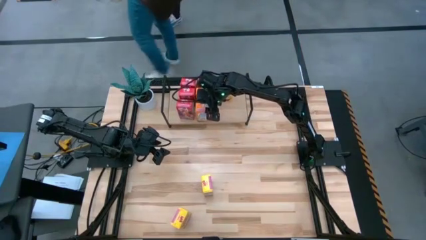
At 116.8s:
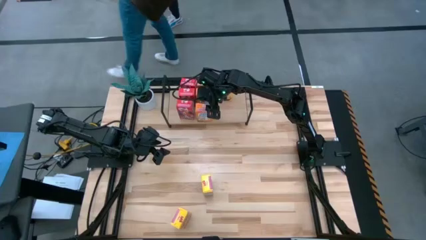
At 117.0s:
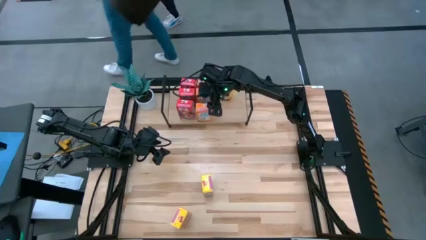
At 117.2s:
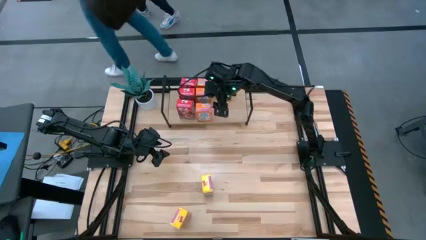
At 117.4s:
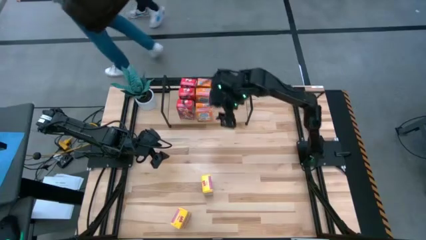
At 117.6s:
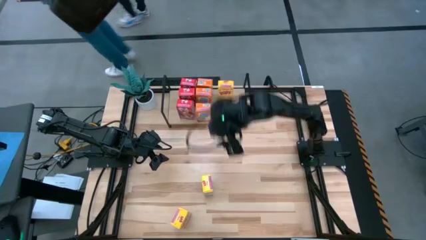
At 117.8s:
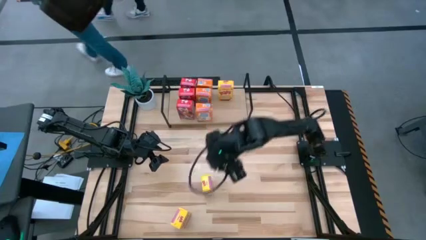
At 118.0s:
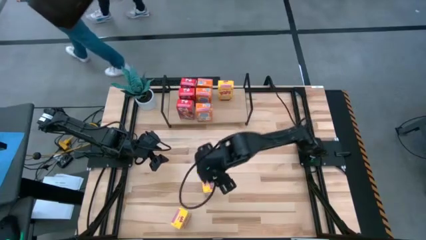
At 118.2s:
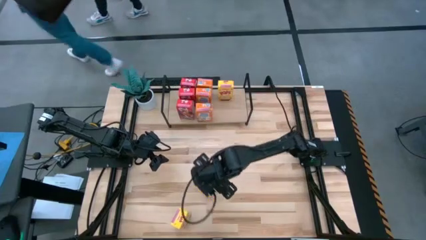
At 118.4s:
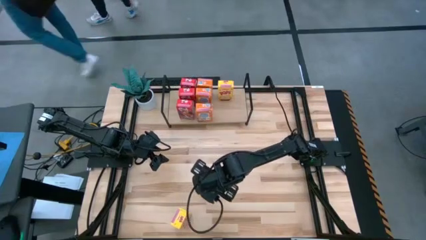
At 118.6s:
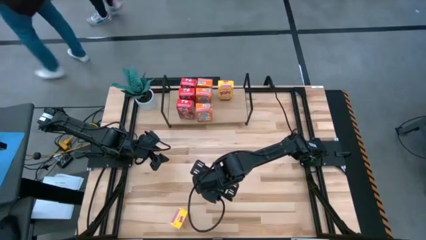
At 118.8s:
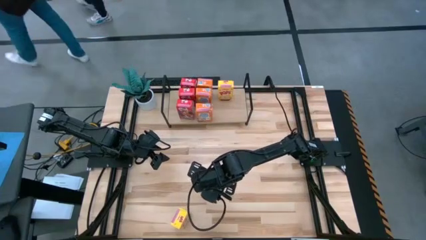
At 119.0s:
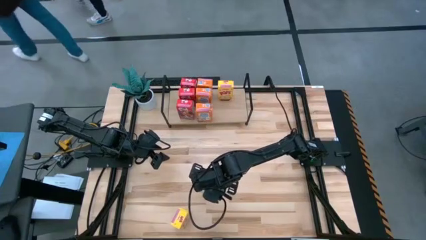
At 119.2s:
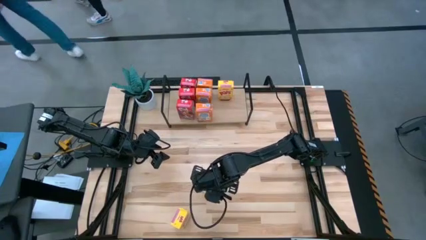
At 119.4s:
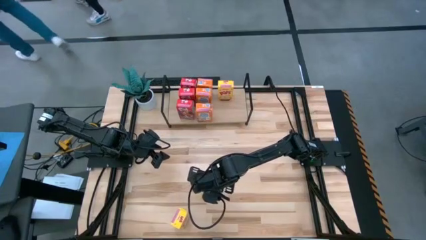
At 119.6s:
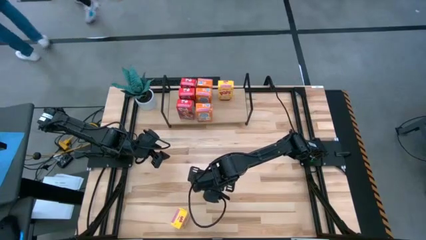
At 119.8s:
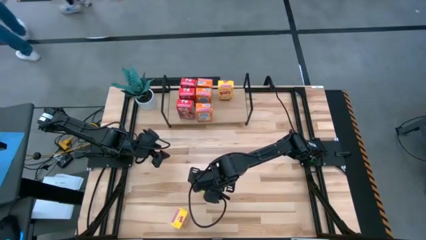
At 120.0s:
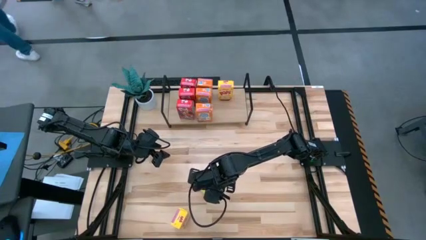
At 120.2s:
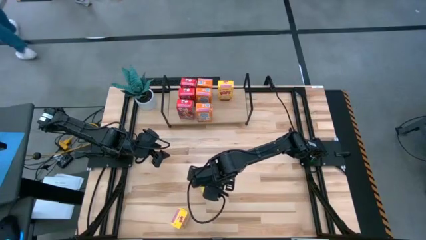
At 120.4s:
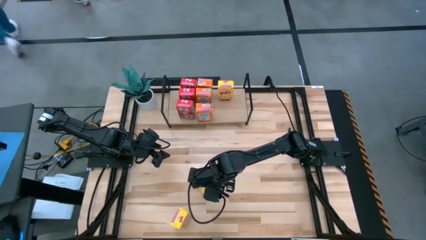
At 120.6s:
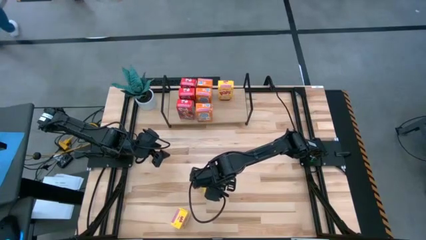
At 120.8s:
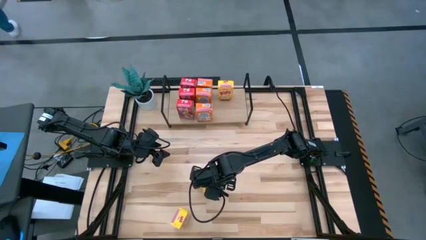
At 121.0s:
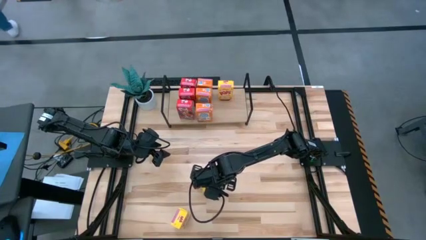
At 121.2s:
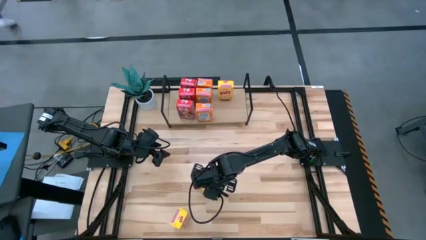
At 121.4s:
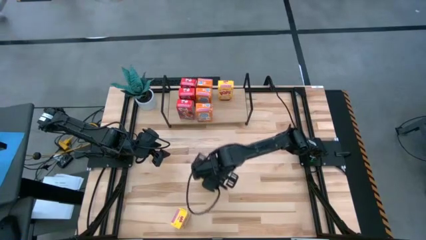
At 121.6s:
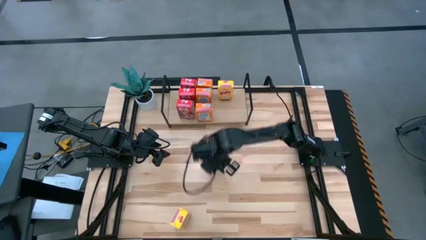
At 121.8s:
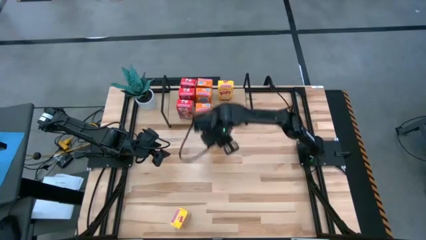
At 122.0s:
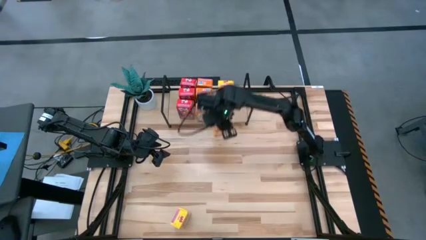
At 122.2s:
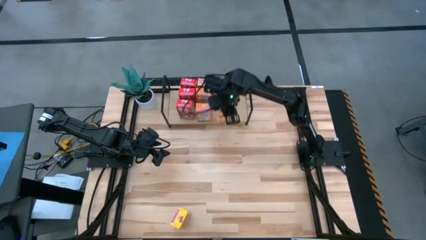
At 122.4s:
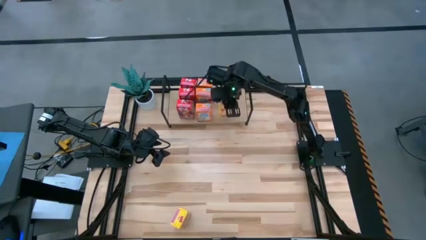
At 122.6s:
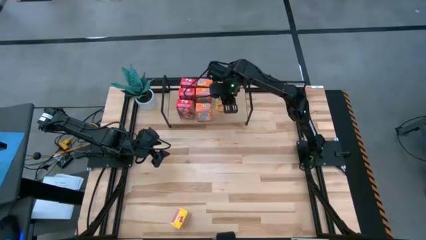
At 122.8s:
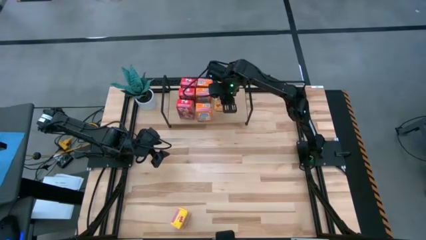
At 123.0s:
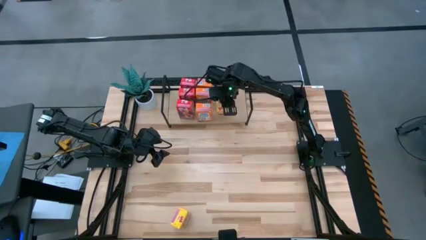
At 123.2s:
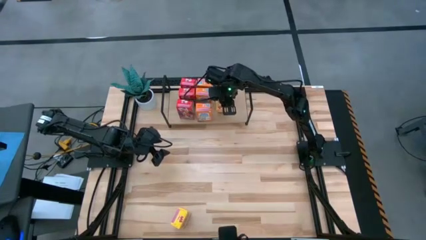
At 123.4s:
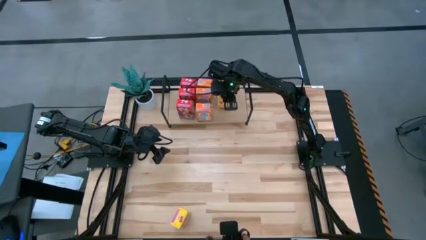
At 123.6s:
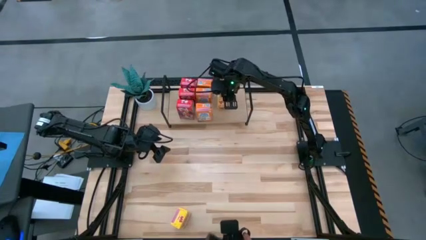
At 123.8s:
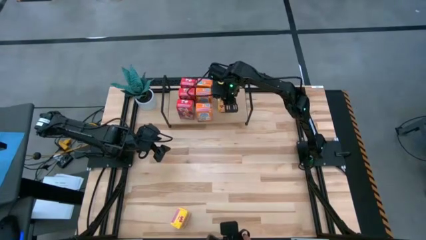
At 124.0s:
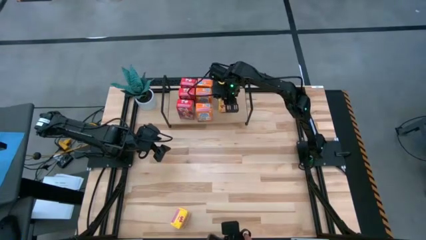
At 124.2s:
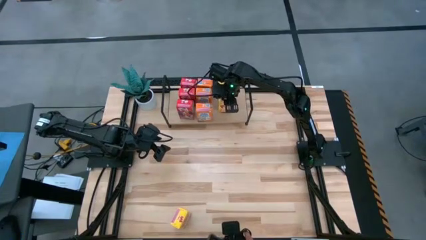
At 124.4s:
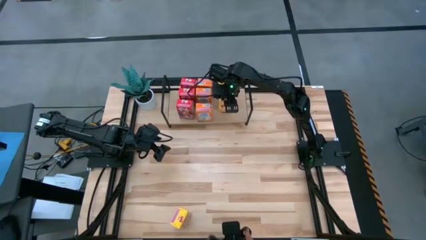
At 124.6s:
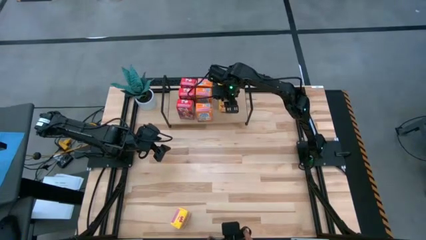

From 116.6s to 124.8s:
Task: Stack cereal on shelf
Put the top yellow cereal box on the shelf aligned with the other yellow cereal box

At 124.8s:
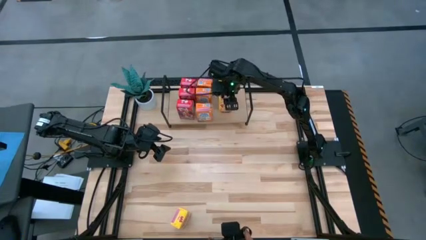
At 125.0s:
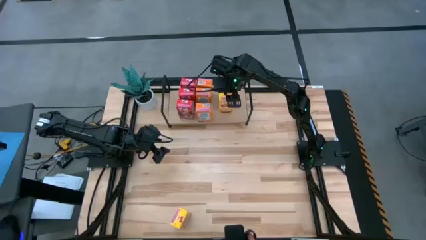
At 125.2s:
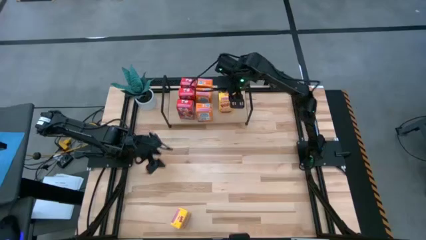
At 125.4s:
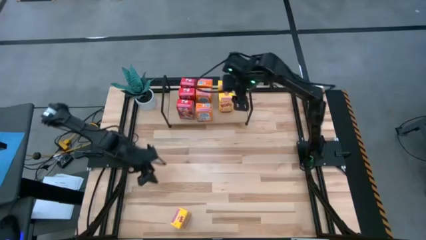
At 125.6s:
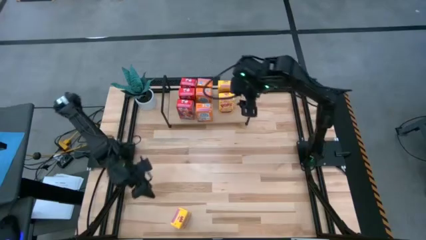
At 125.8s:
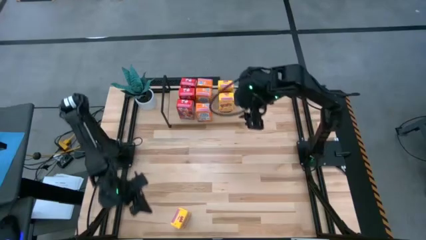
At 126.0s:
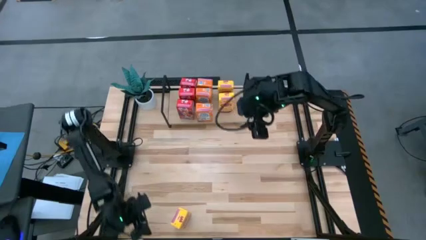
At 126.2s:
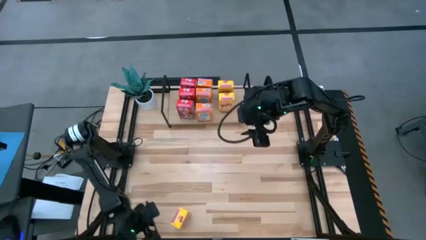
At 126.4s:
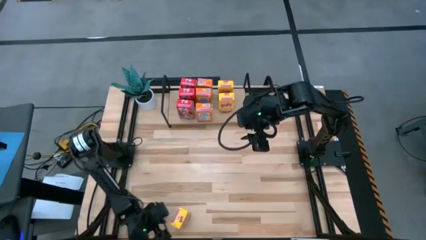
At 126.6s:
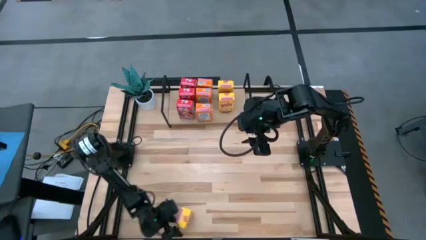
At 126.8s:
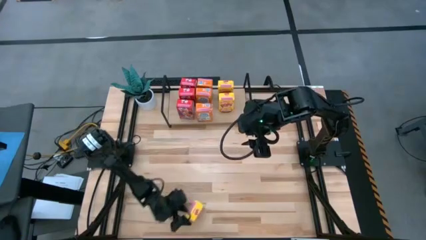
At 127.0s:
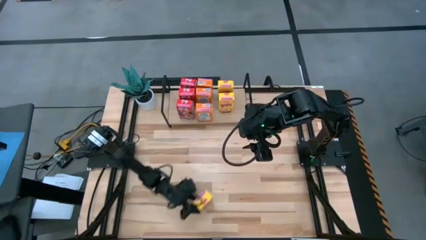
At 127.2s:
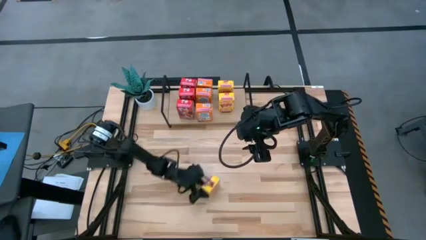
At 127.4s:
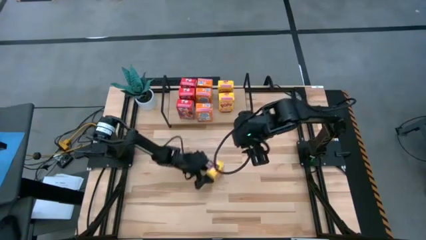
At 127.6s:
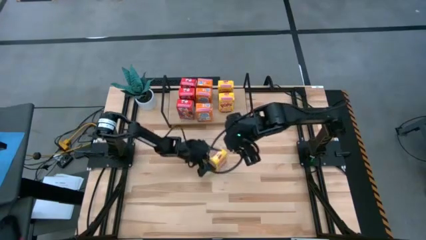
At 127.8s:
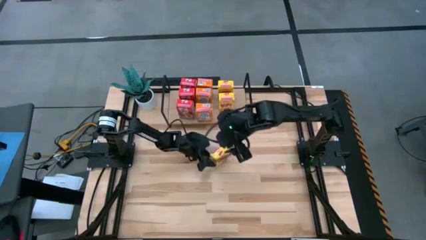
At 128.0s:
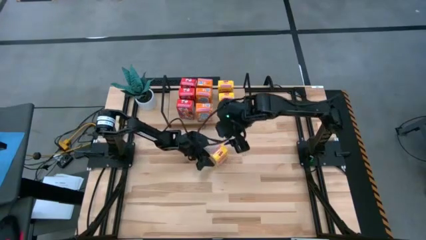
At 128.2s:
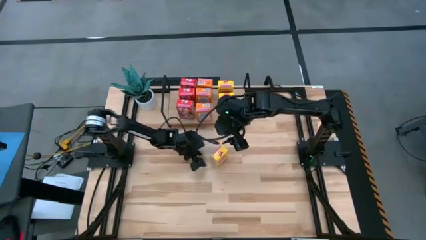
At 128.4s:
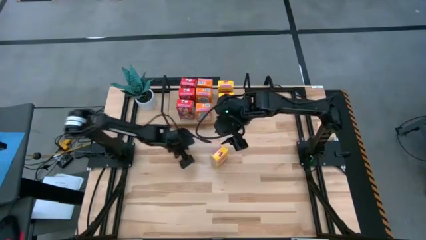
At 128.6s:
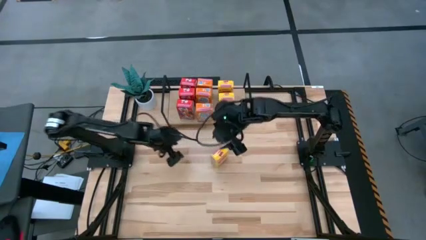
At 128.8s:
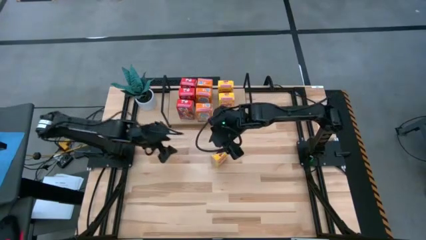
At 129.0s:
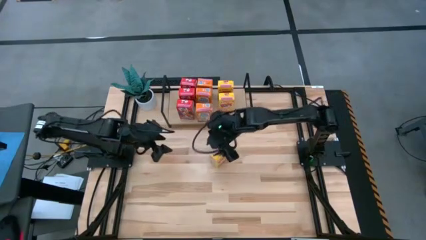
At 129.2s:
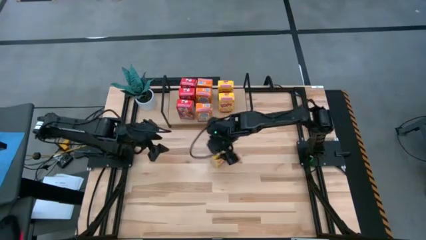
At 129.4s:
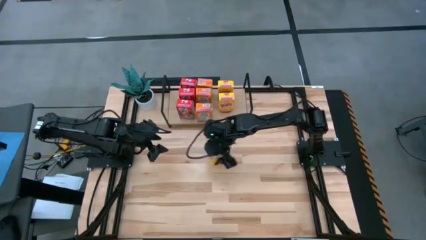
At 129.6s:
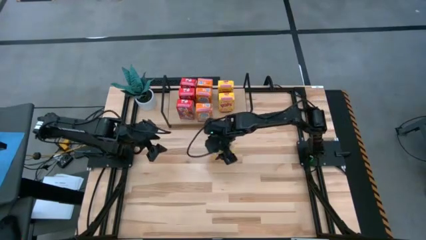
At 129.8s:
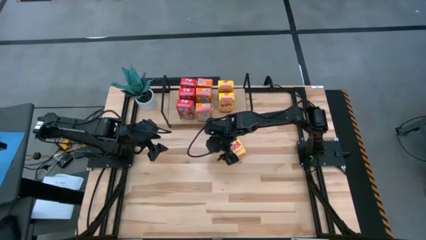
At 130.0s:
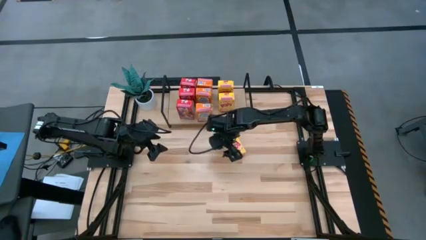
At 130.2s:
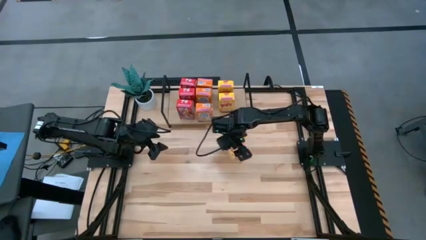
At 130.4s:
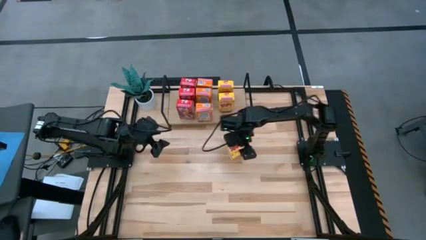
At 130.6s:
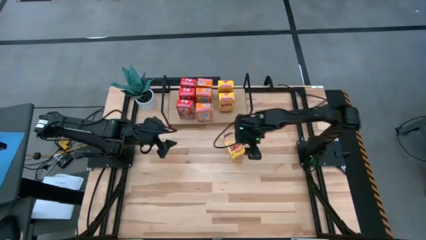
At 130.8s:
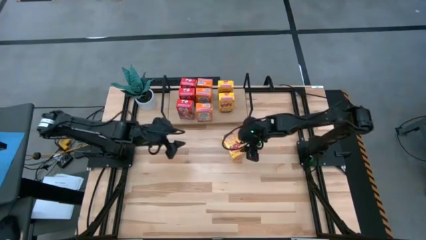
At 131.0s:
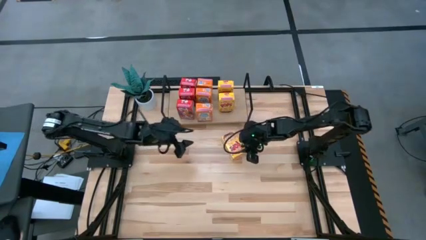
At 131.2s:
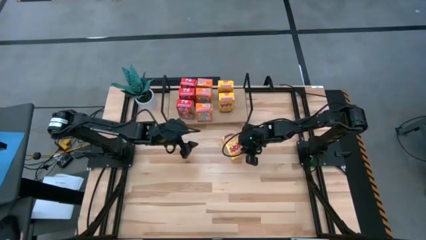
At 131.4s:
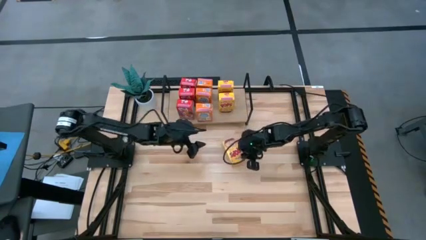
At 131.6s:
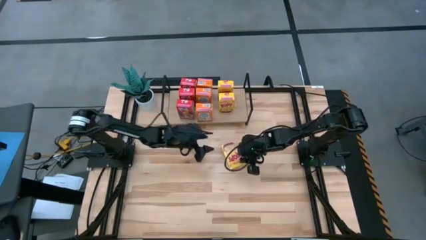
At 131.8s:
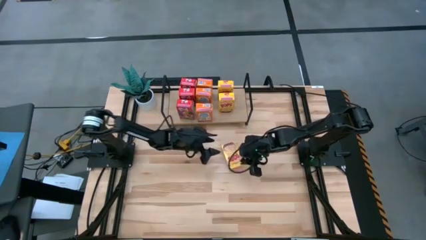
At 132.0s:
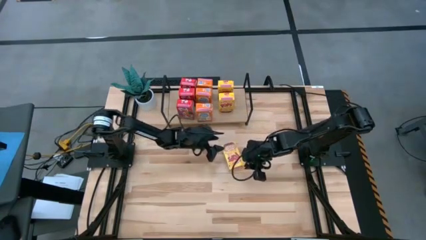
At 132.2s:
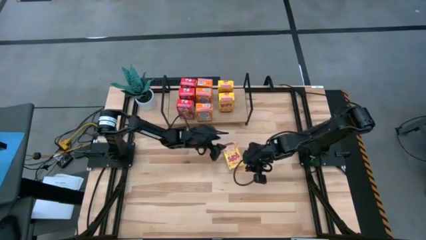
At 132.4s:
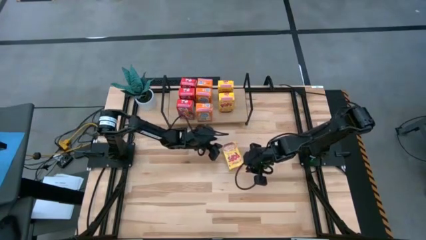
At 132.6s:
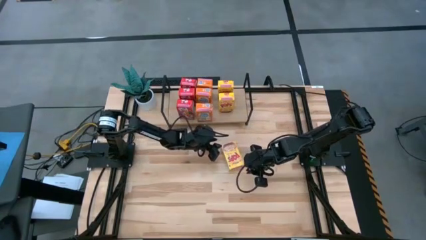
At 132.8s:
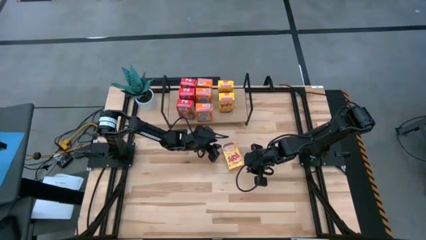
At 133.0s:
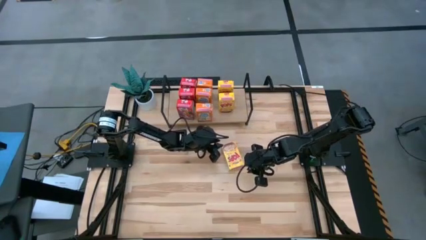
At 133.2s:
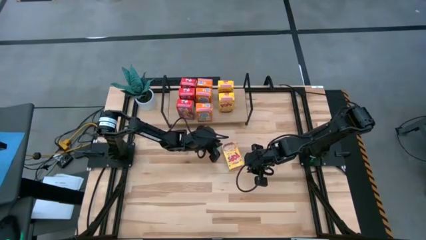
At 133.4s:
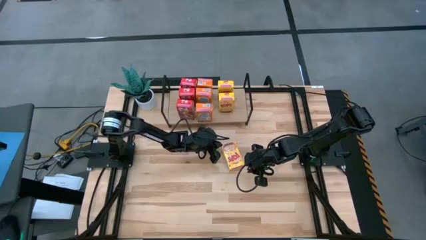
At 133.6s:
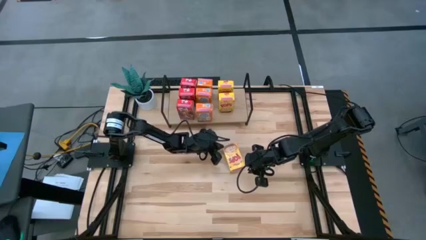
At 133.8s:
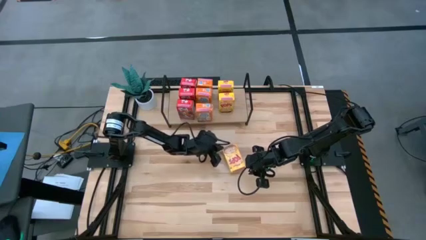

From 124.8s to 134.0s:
Put the yellow cereal box on the shelf aligned with the other yellow cereal boxes
